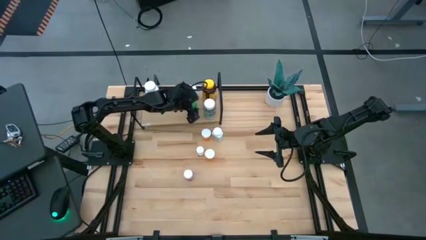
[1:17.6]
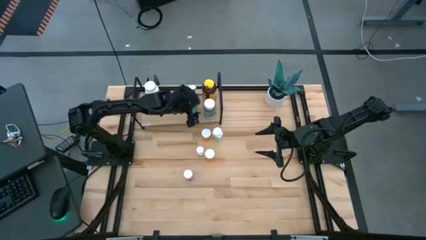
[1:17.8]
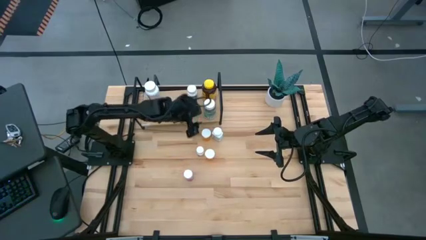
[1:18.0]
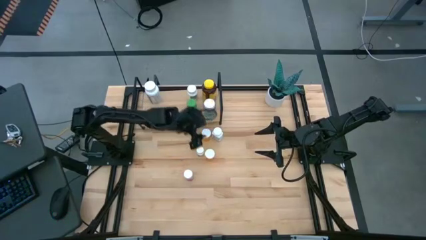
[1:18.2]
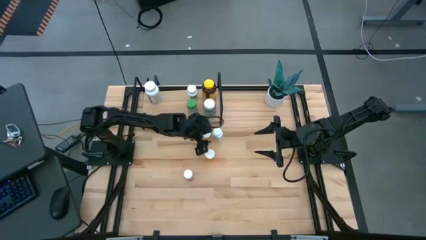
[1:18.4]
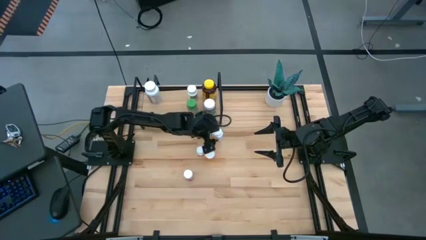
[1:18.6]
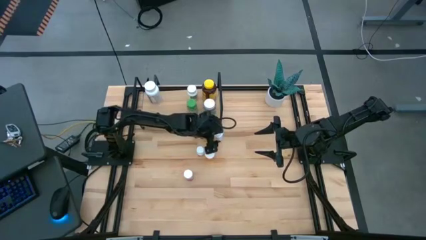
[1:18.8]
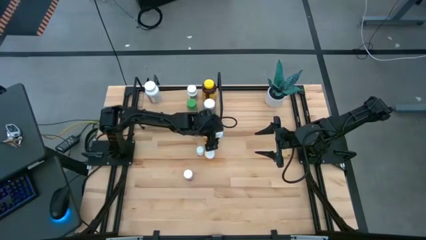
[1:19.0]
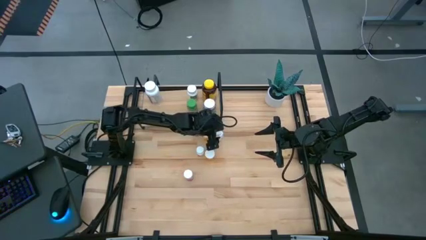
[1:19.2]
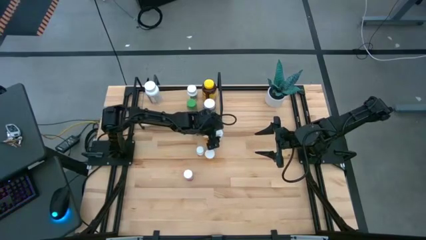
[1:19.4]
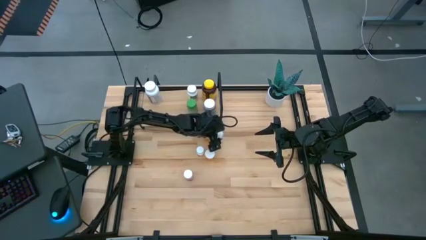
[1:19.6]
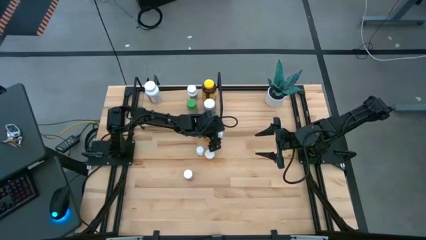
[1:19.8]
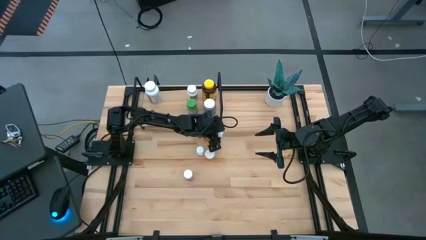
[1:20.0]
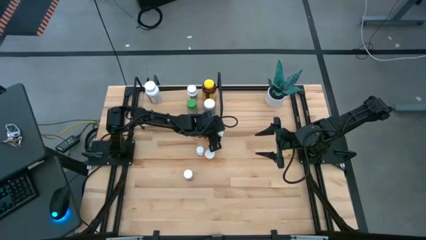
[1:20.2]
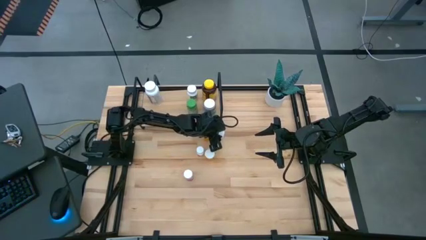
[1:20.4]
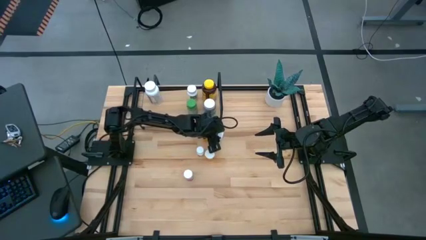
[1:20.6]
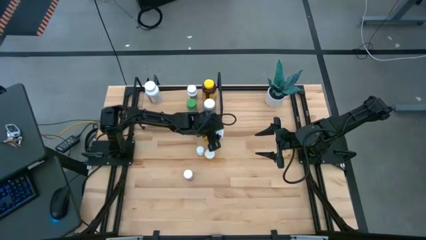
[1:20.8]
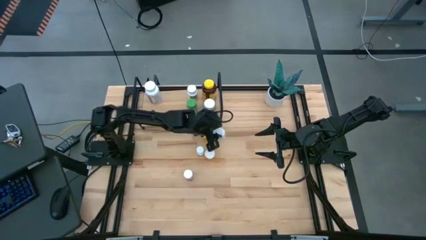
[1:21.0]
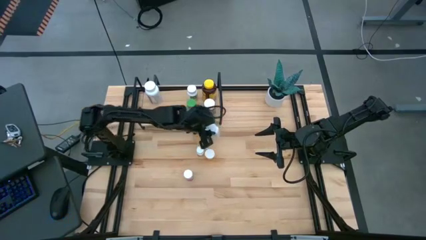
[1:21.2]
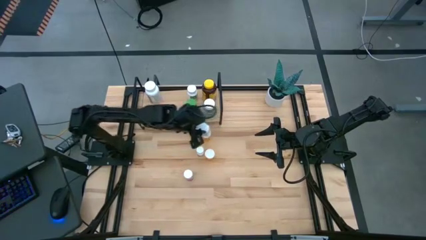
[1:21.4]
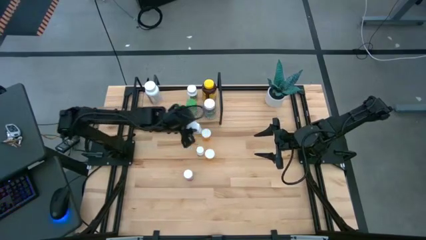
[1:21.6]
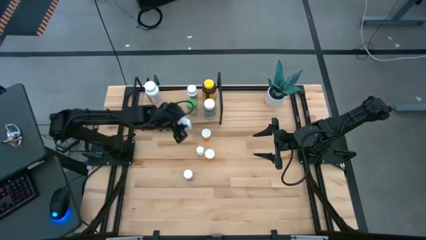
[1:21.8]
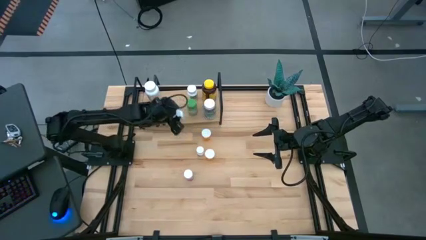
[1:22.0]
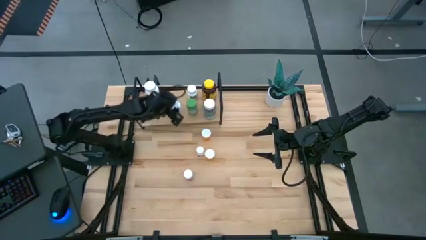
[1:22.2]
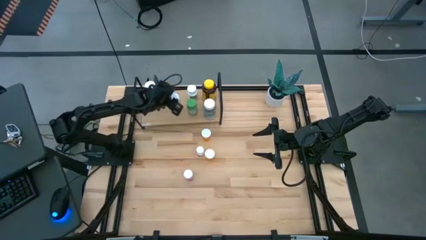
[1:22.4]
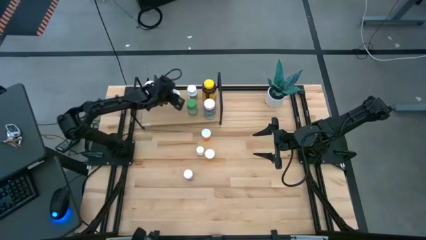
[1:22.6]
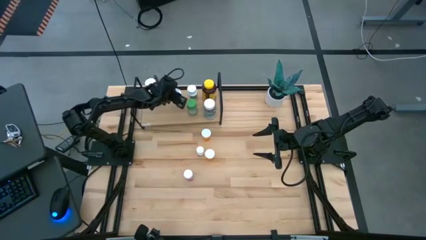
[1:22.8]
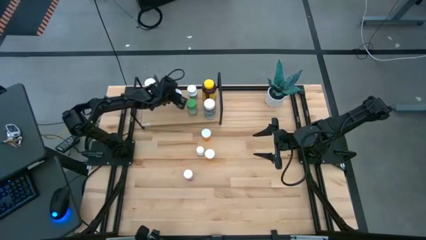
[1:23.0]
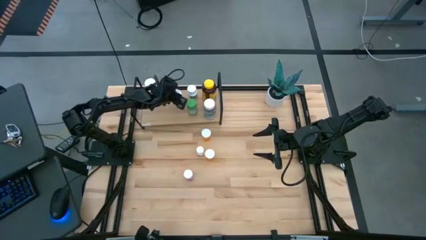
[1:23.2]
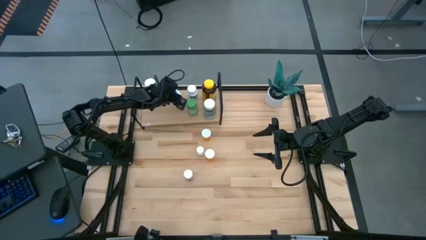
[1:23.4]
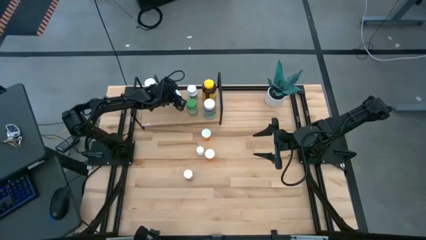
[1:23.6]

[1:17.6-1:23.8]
Task: Pick and place medicine bottles onto shelf by color
Put the white and blue pill bottle on the shelf

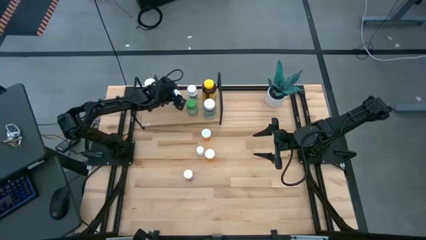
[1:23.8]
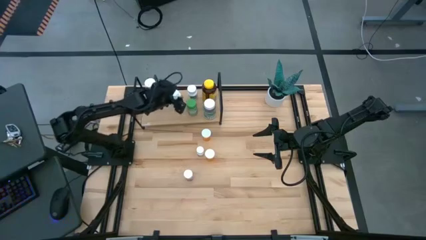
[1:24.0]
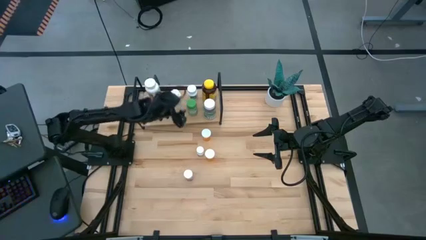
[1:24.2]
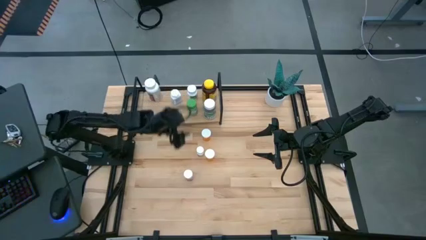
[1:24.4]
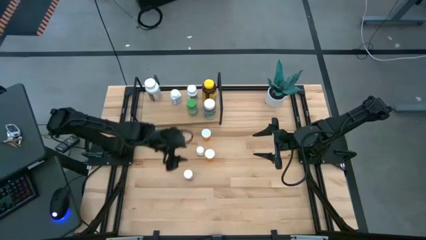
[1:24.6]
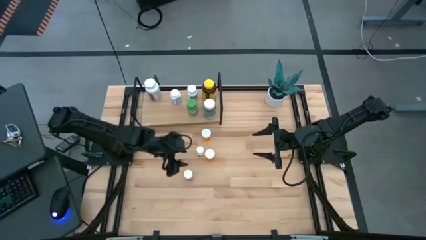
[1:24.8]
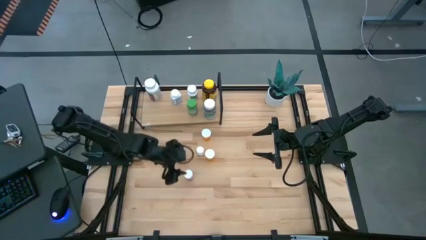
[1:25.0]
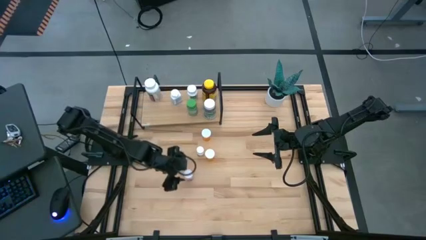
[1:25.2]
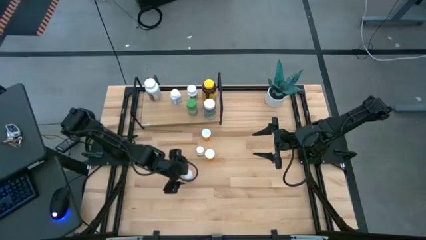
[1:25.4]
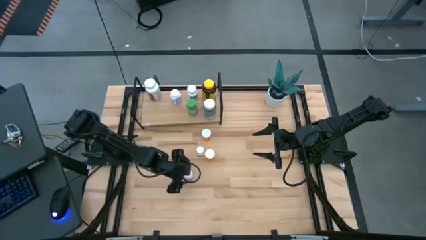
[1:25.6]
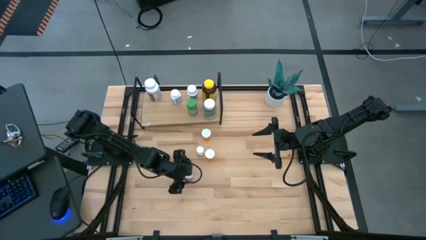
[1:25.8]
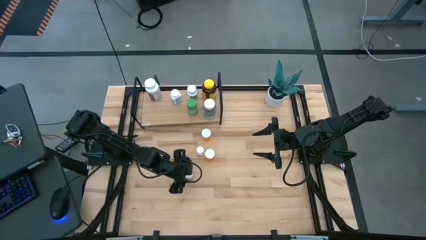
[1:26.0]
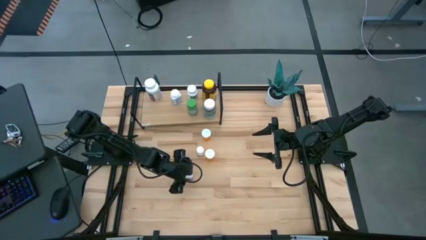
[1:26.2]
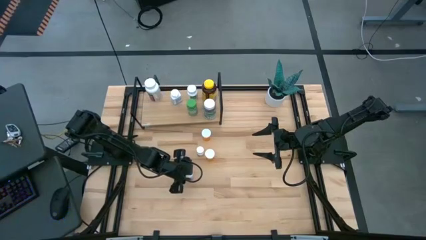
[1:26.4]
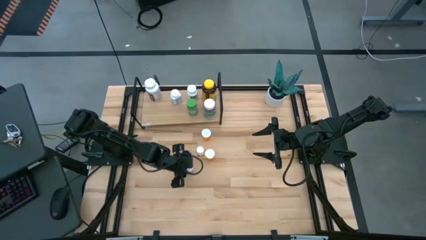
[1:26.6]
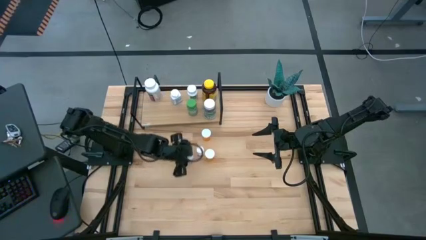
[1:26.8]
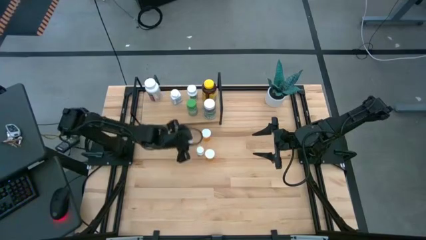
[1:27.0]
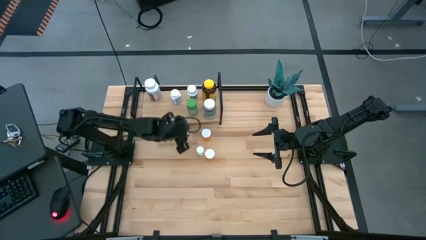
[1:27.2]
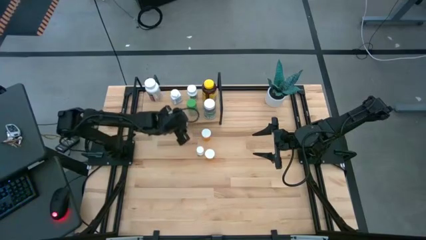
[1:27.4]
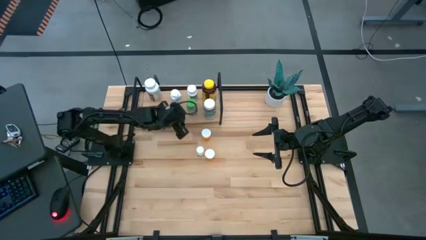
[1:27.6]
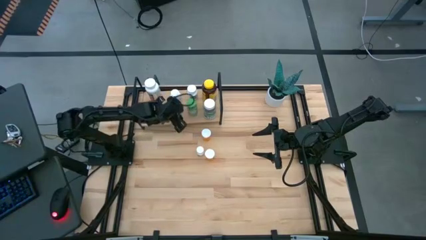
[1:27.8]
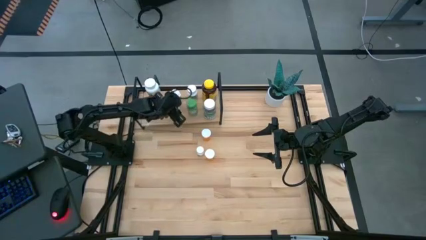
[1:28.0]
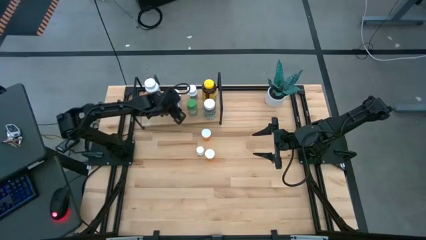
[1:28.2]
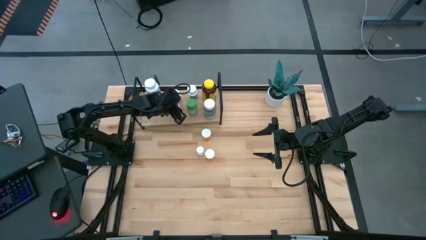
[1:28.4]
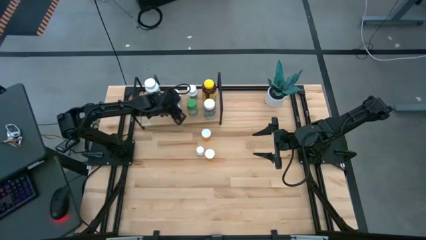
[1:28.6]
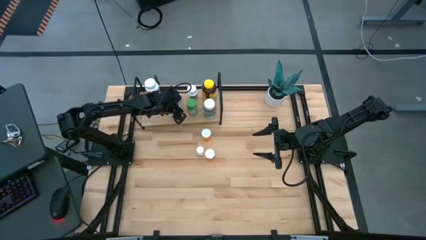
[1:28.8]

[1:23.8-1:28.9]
Put the pink pill bottle on the shelf

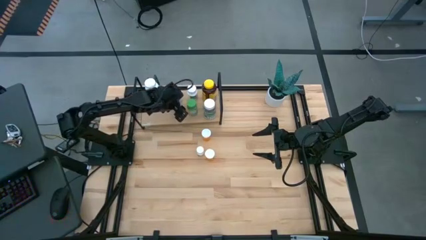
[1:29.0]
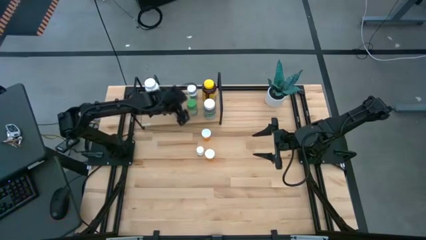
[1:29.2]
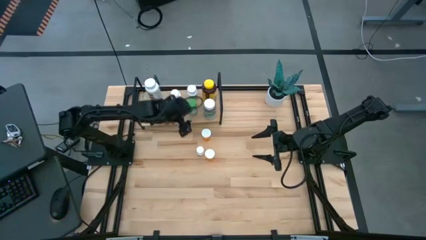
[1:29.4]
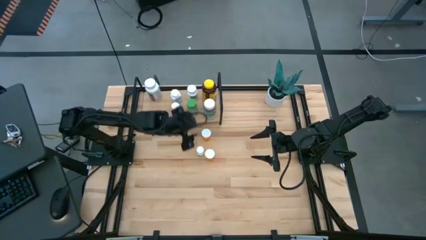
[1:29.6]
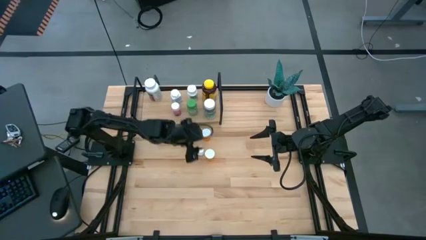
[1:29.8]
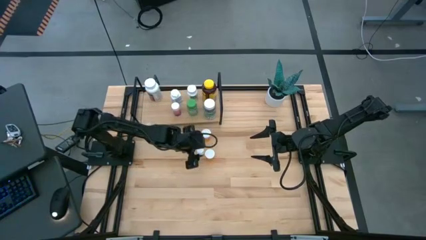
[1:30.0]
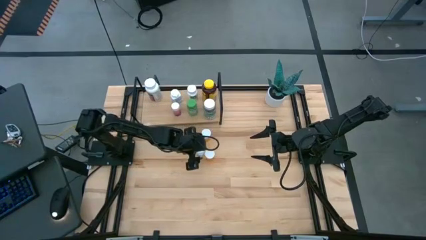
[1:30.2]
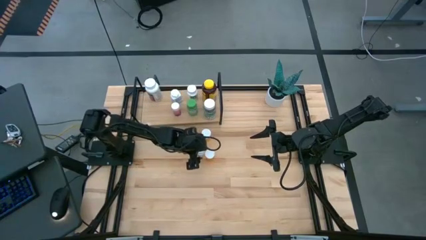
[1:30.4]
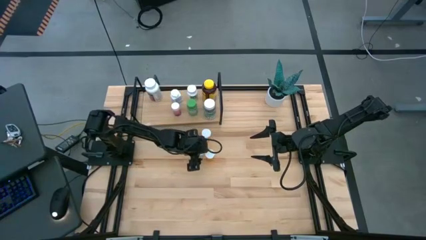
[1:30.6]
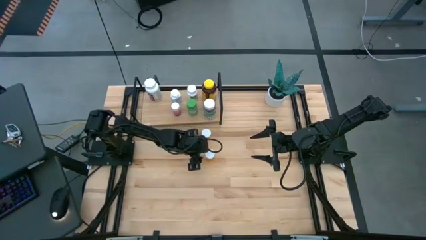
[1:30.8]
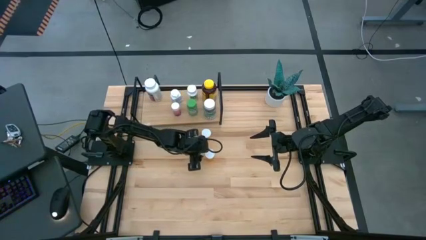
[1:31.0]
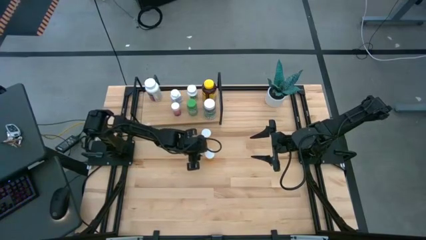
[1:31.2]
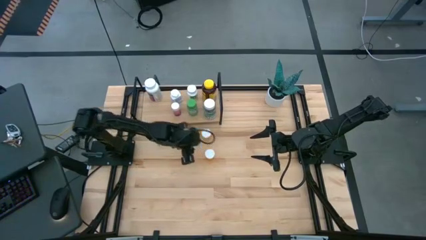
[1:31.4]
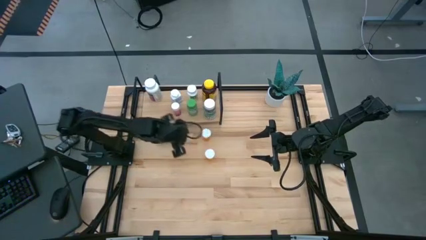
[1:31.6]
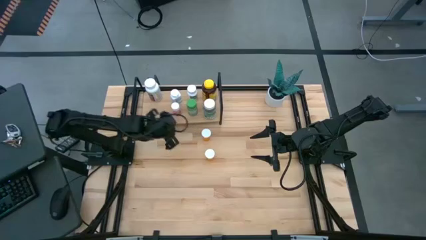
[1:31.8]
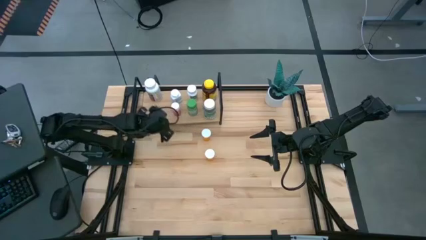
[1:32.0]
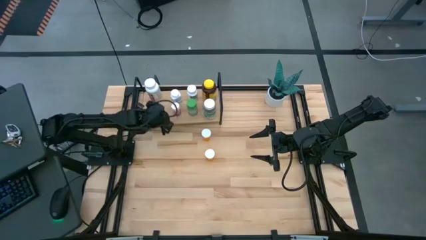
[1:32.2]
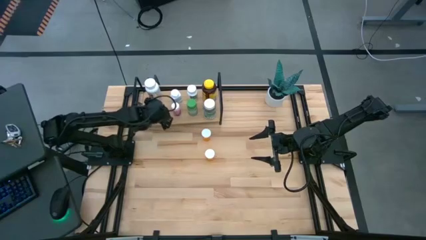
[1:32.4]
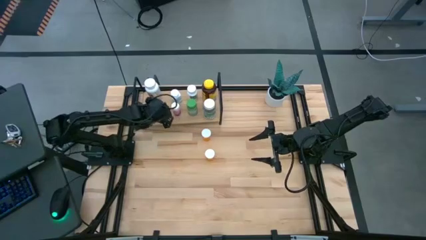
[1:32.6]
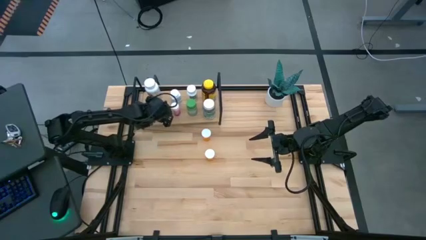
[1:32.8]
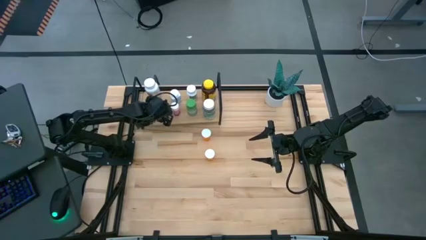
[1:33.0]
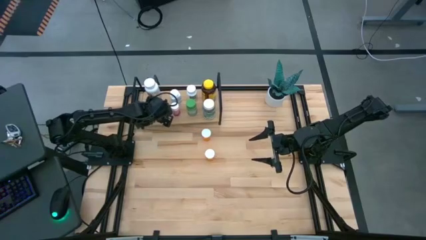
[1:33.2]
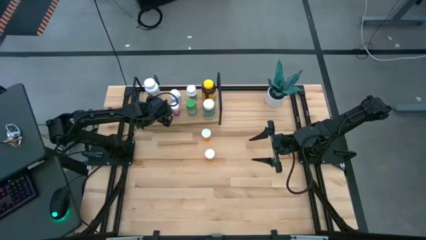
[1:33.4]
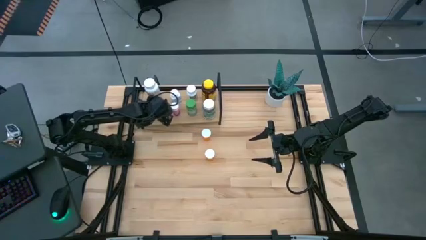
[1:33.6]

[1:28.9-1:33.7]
Put the small white pill bottle on the shelf

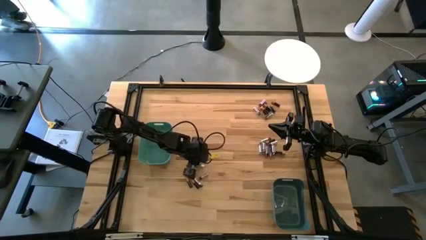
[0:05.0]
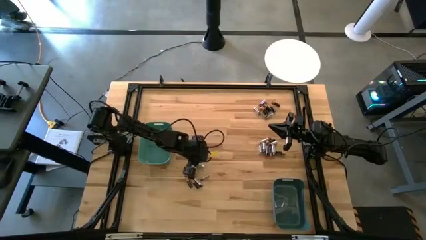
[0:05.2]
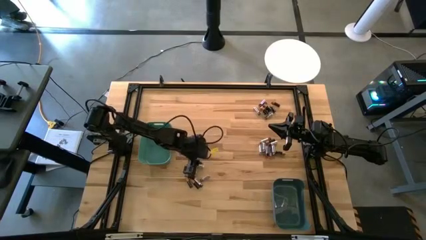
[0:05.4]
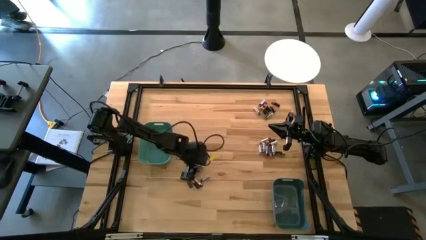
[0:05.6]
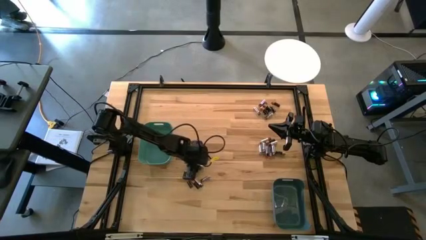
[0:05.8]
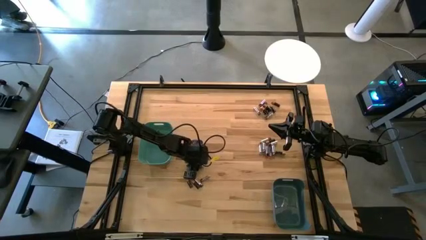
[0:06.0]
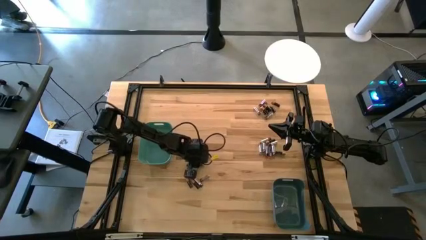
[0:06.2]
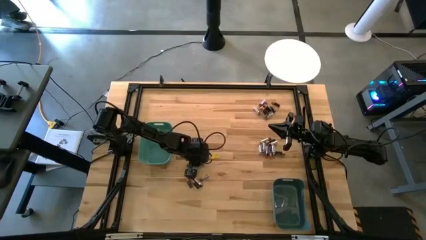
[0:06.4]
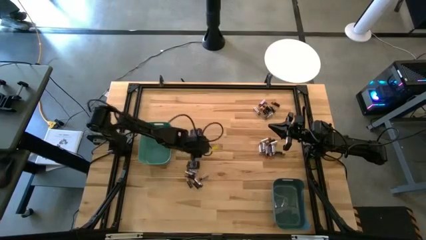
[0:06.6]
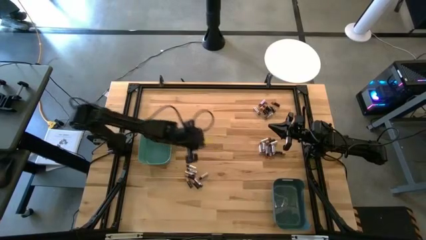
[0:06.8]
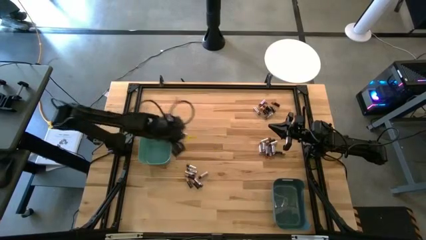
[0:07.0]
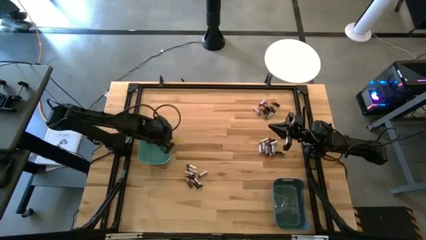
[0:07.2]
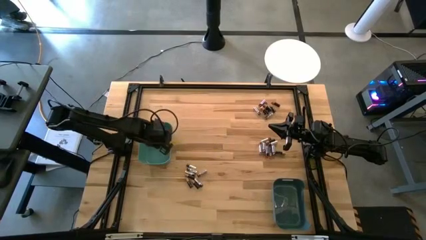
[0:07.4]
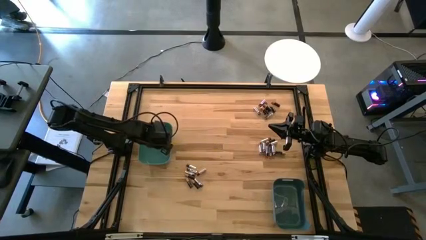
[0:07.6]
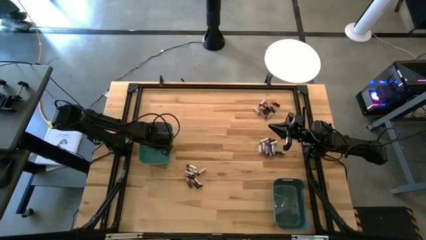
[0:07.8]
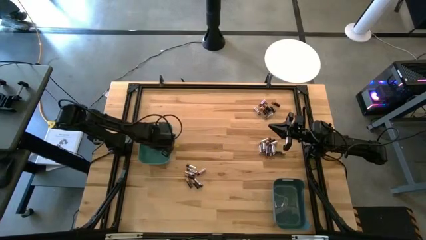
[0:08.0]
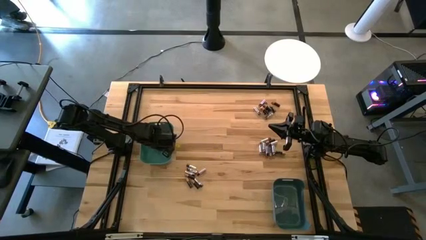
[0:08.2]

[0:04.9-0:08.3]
Task: Sort batteries
Put the silver battery into the green bin
